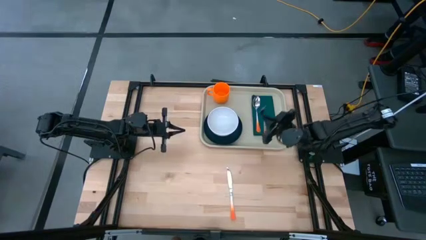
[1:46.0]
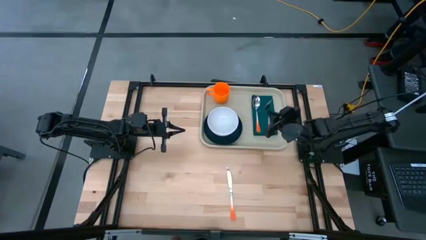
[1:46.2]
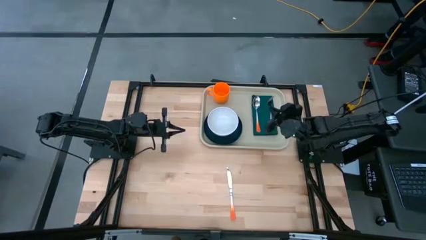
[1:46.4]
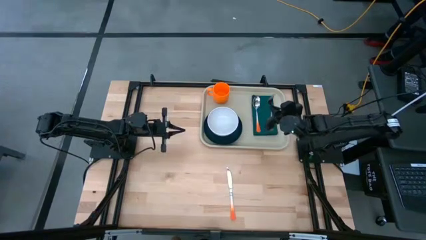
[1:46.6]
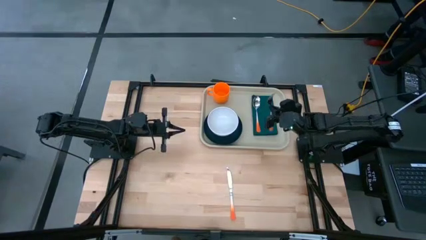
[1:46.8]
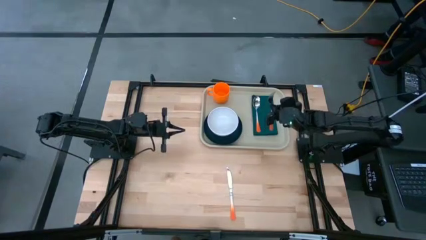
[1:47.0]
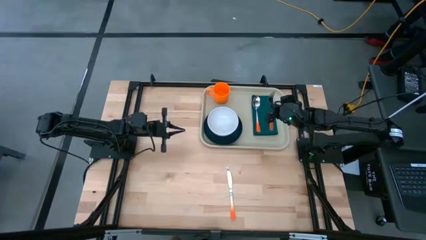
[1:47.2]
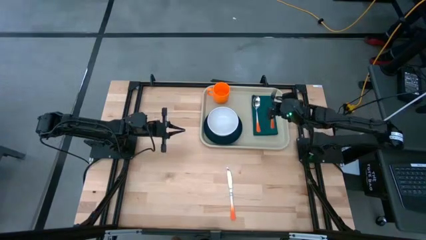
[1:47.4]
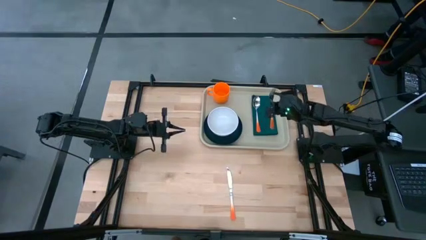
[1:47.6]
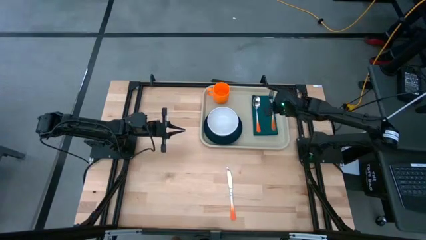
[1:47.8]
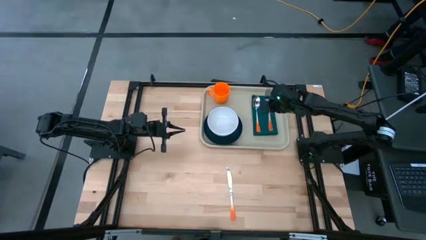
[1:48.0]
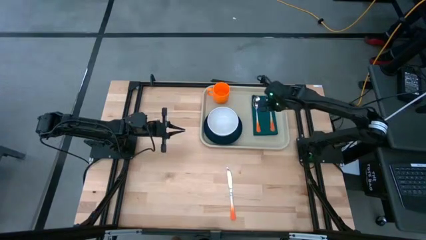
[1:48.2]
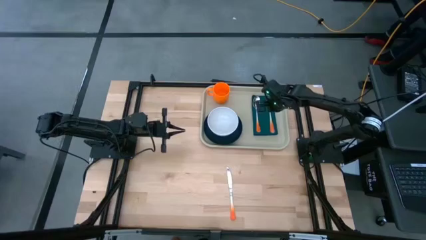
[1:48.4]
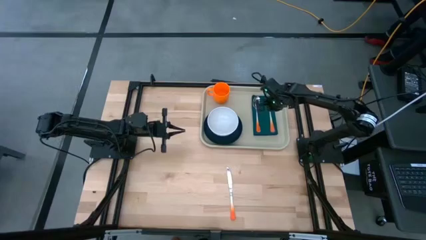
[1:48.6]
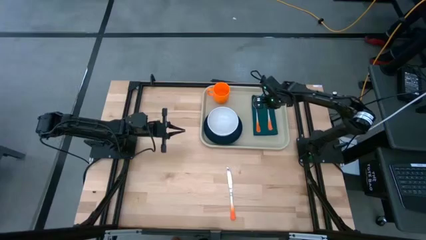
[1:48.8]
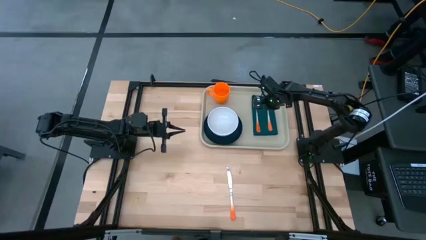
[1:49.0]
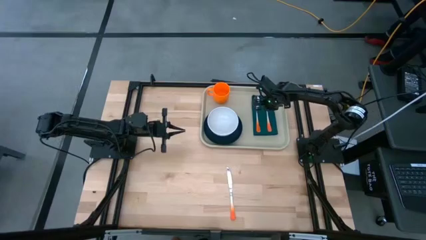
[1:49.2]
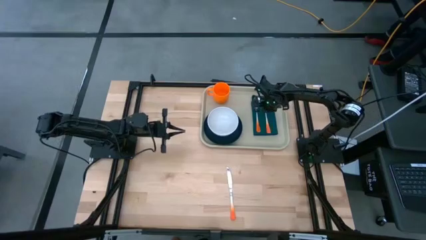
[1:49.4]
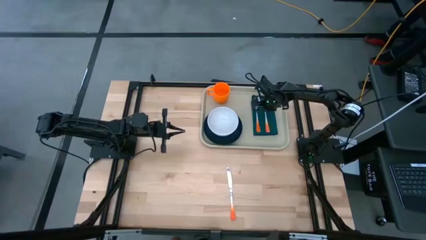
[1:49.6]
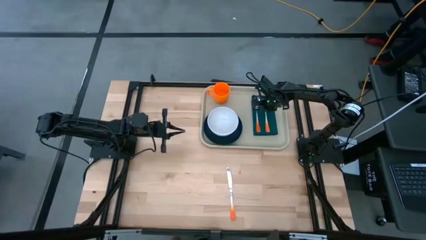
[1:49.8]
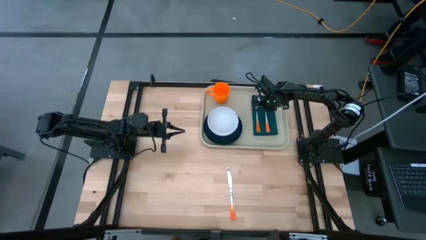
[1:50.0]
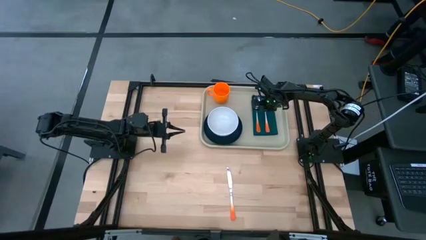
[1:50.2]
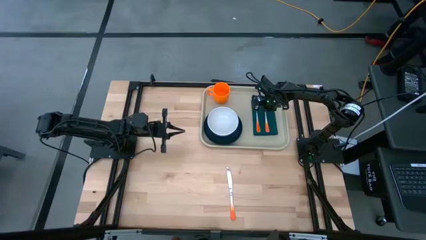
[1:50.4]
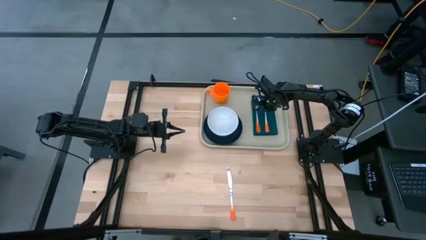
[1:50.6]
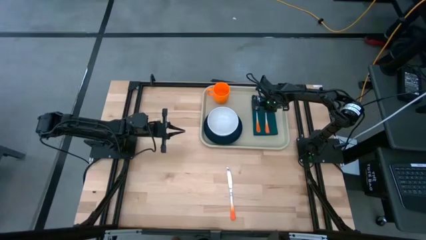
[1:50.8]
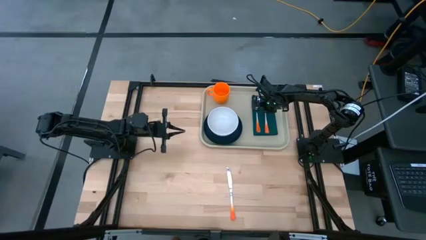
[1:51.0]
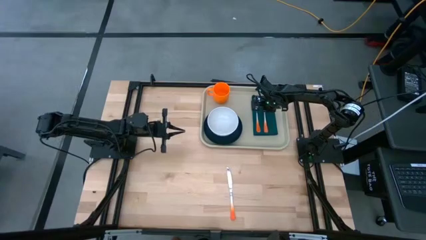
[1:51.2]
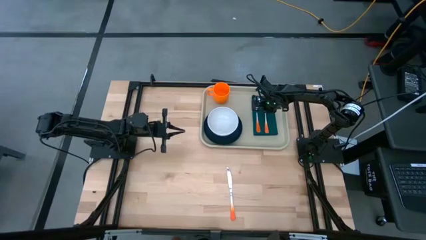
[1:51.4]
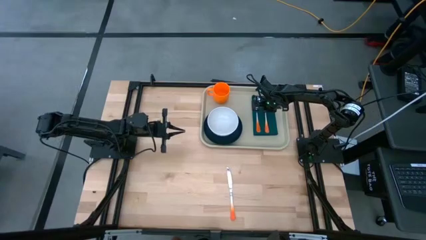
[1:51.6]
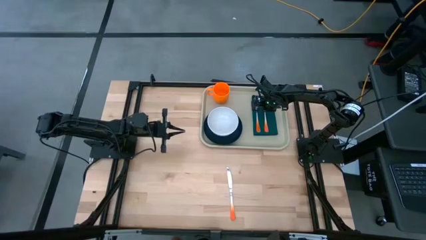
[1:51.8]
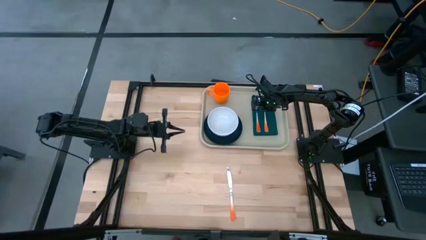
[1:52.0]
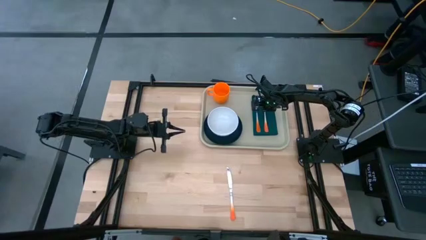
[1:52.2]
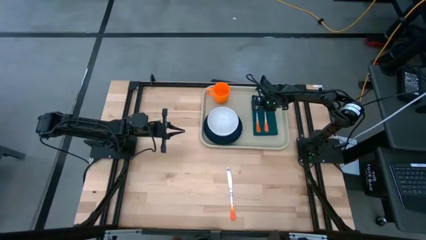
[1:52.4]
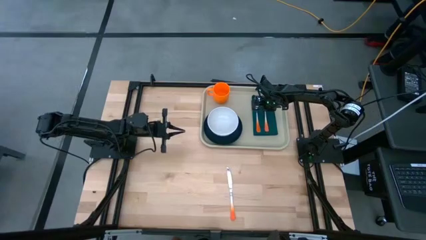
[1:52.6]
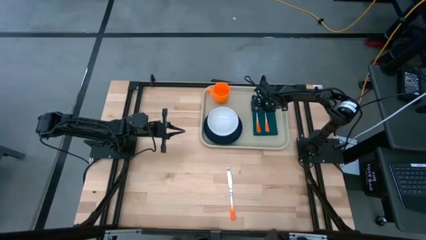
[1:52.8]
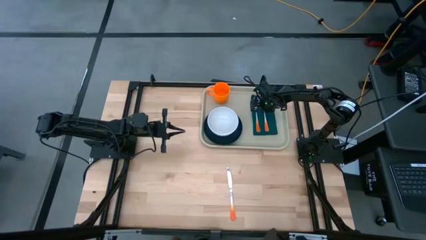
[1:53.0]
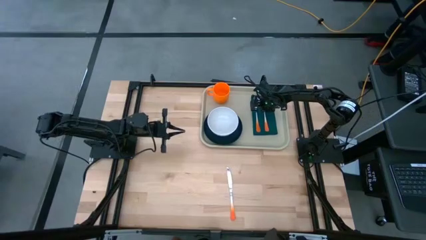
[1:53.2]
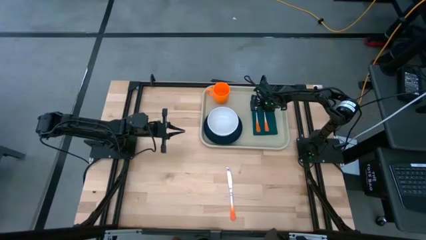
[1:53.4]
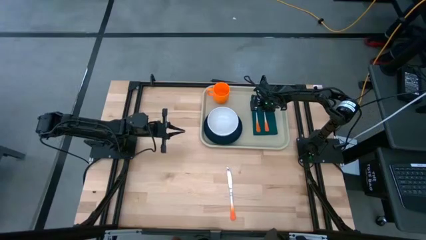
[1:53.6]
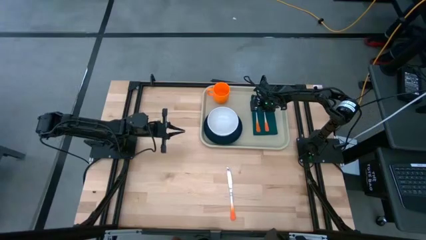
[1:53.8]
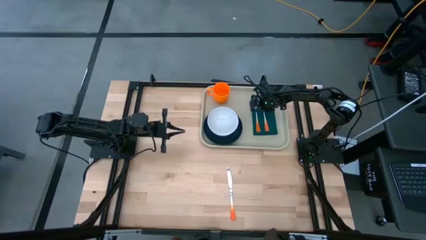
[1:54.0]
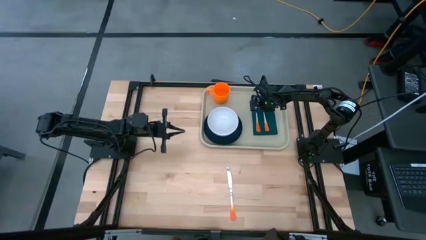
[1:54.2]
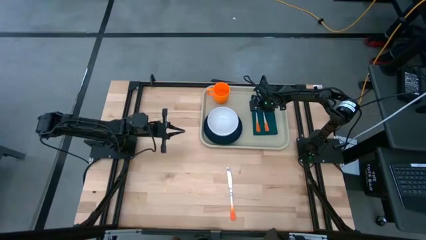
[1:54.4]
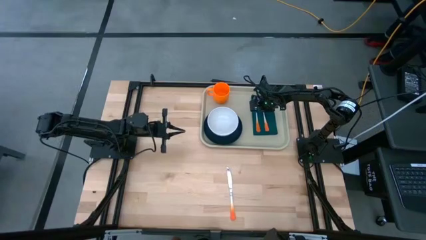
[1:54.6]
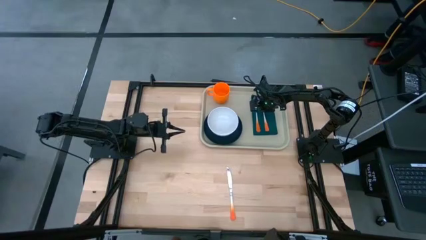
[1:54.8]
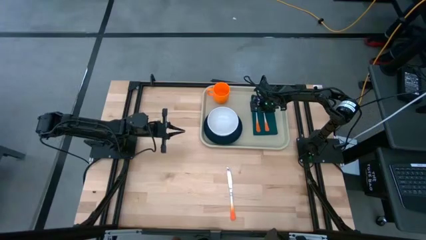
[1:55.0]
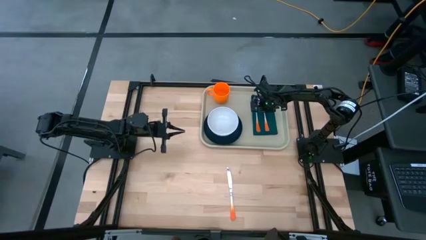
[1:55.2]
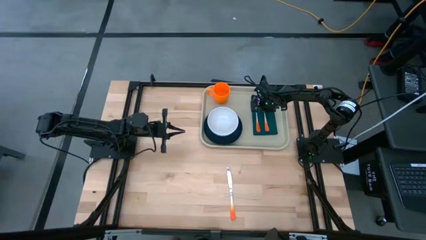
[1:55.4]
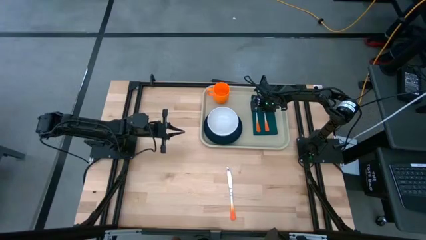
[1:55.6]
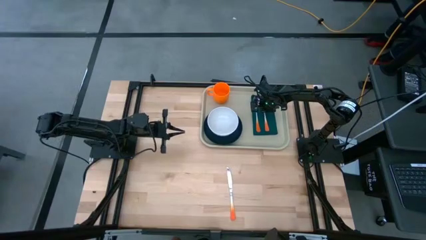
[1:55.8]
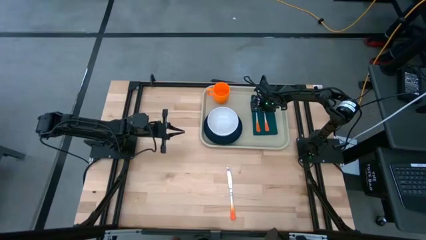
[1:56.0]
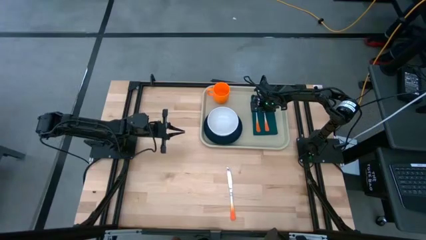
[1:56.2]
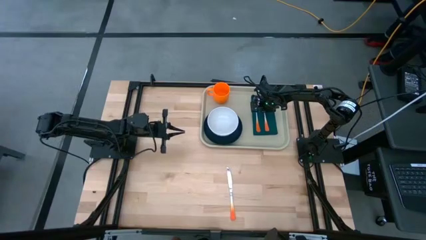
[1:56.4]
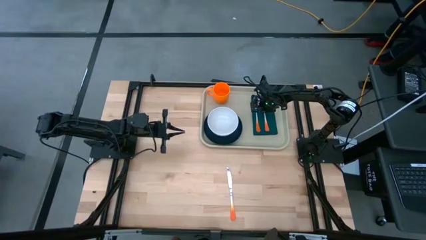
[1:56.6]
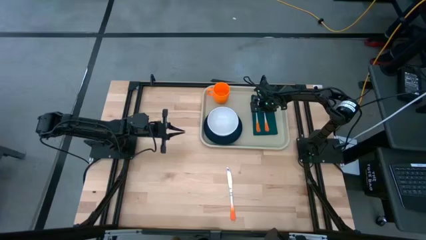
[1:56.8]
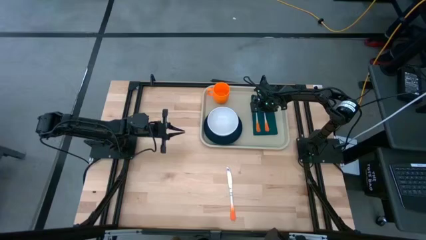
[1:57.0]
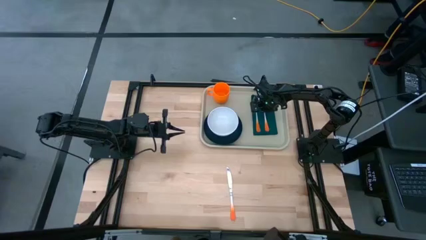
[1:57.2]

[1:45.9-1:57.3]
Task: Set up tray
Put the orange fork to the right of the orange spoon on the serving tray

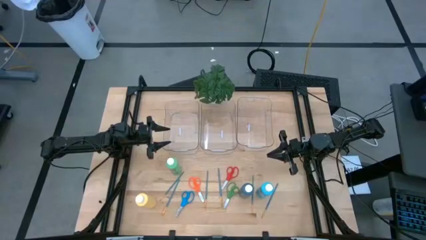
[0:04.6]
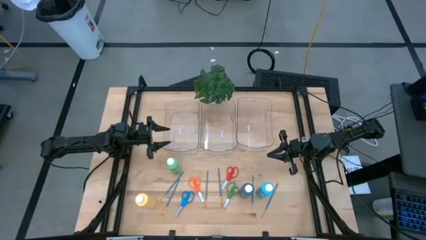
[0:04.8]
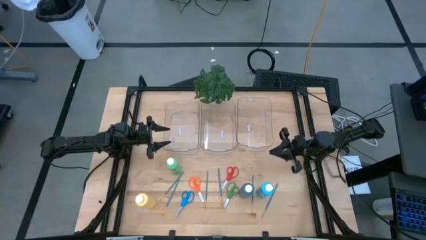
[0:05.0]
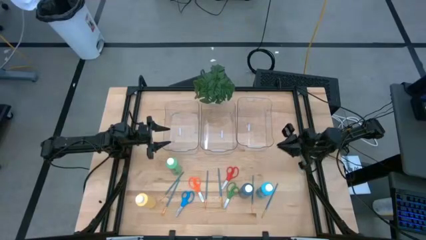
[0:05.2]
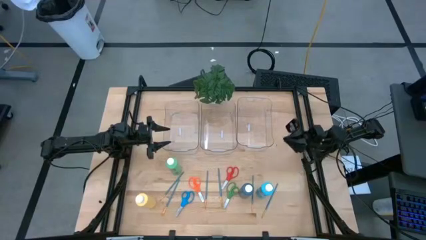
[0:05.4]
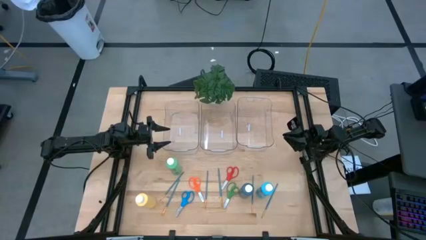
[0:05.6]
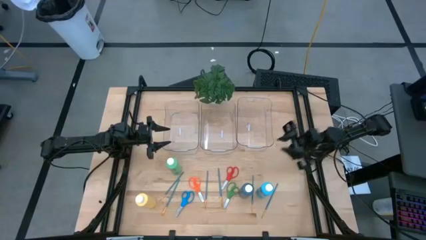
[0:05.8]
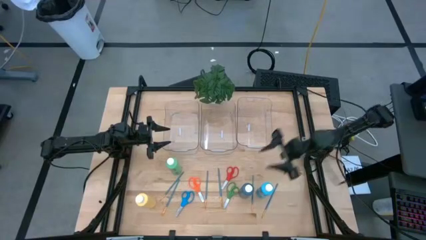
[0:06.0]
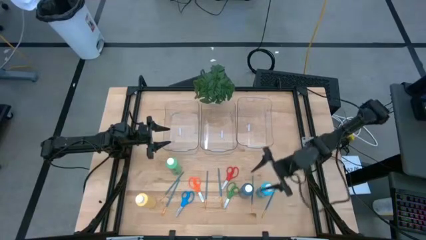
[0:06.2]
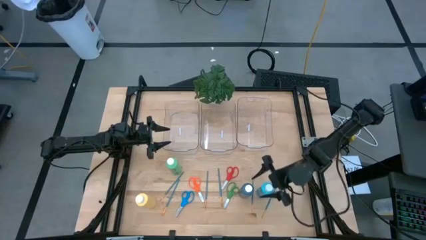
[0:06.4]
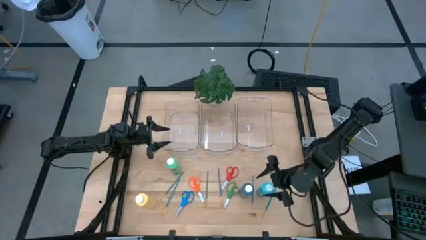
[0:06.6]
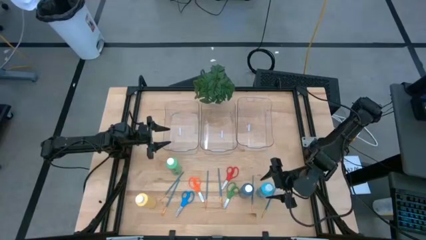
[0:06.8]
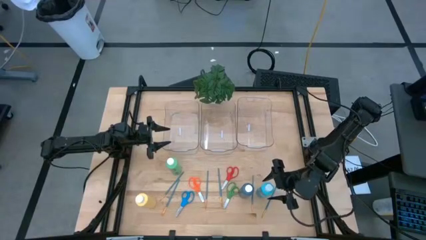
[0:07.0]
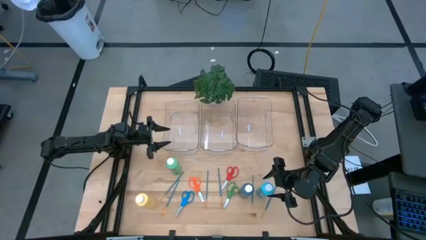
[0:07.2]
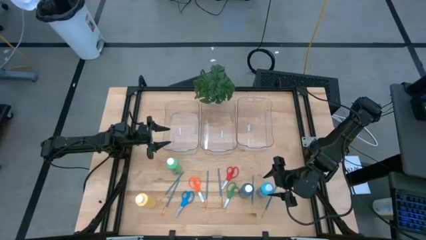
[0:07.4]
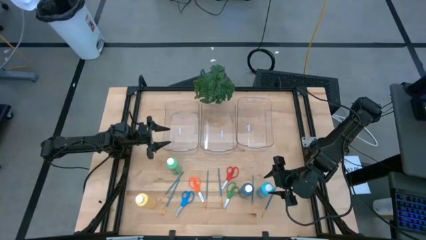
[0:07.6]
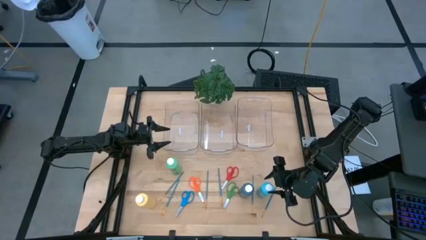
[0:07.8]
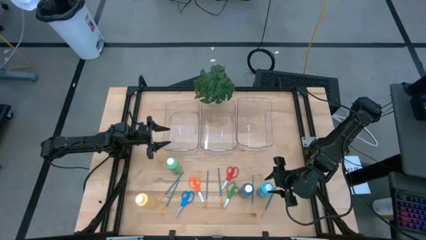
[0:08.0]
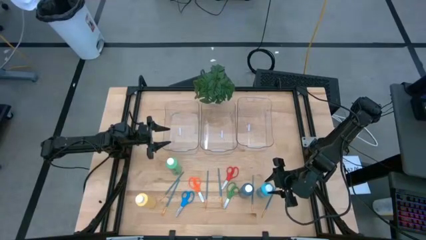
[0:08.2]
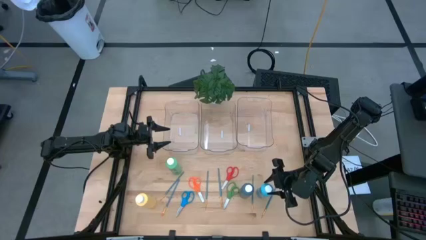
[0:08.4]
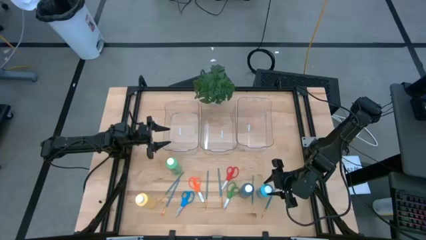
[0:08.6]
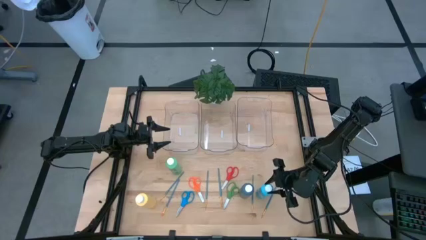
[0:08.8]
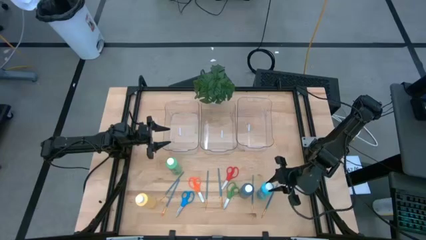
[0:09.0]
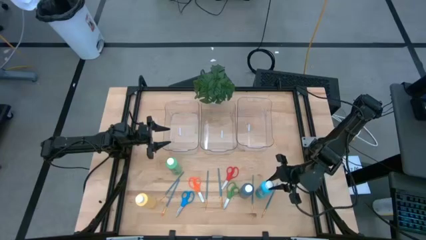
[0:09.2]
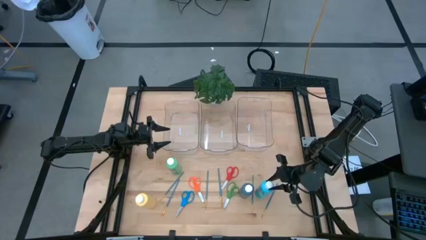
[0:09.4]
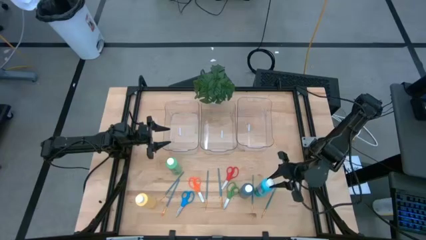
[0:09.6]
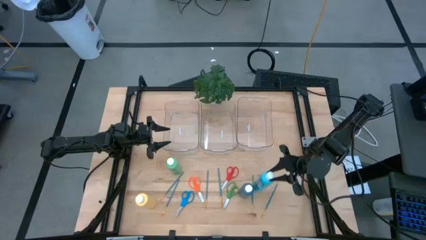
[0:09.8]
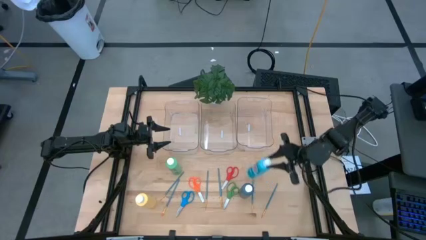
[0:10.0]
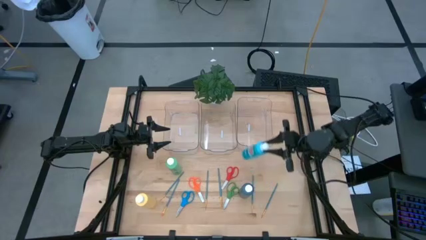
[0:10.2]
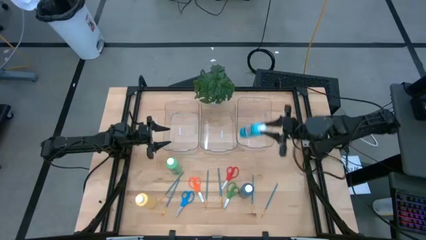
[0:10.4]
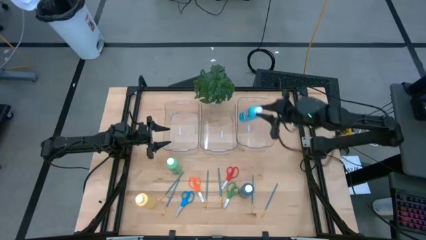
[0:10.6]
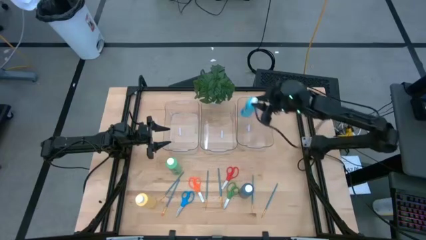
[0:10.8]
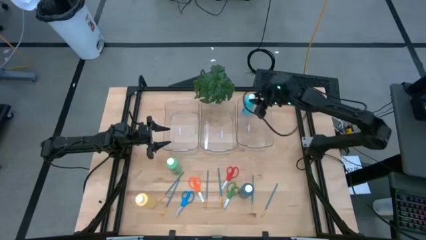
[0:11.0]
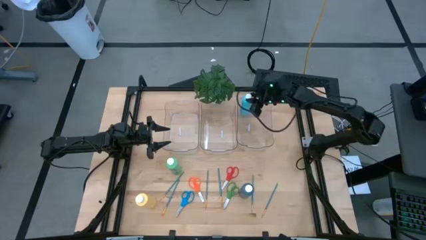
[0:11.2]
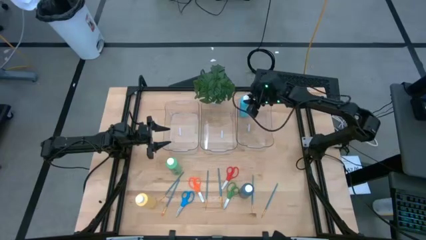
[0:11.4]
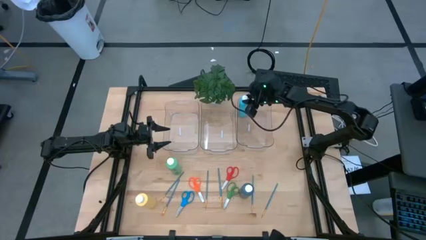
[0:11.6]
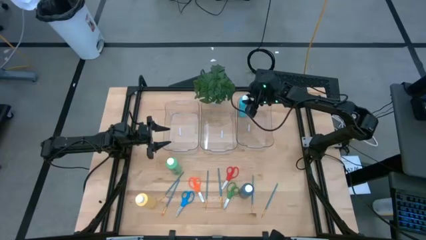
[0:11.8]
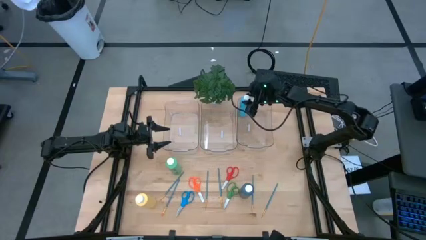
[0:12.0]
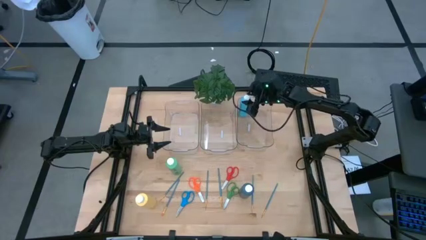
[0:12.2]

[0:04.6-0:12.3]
Task: Pick & Place Paint Supplies
Put the light blue paint bottle into the right transparent bin
